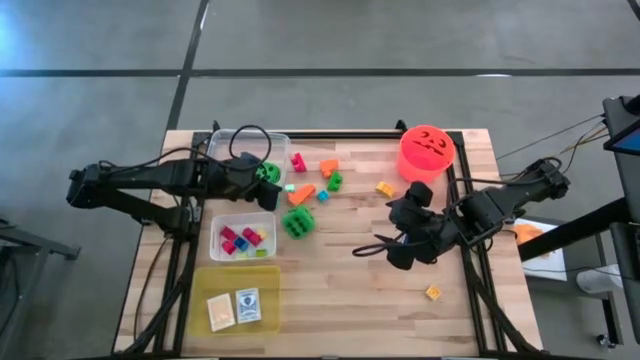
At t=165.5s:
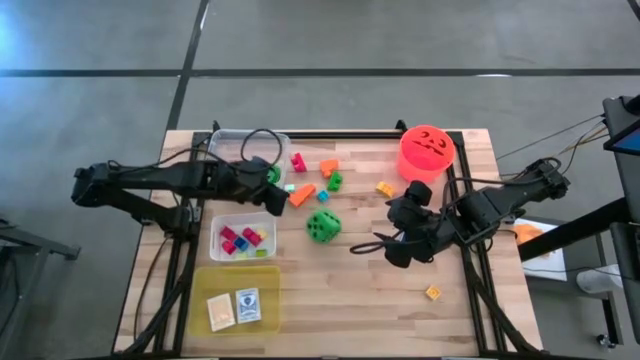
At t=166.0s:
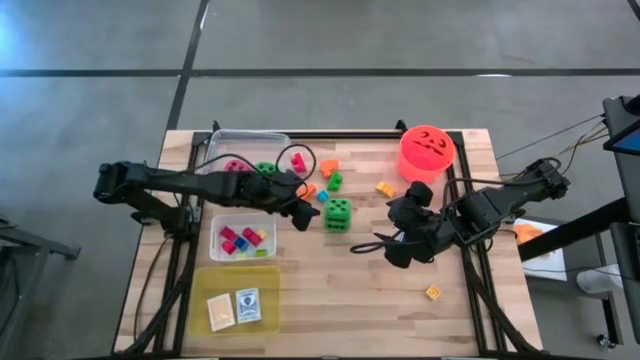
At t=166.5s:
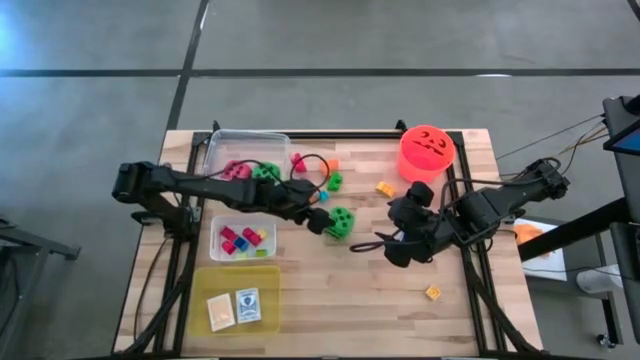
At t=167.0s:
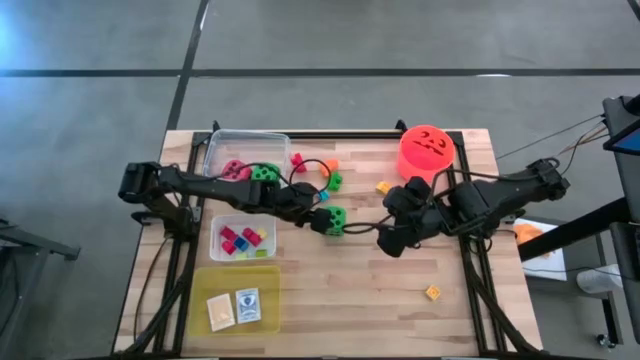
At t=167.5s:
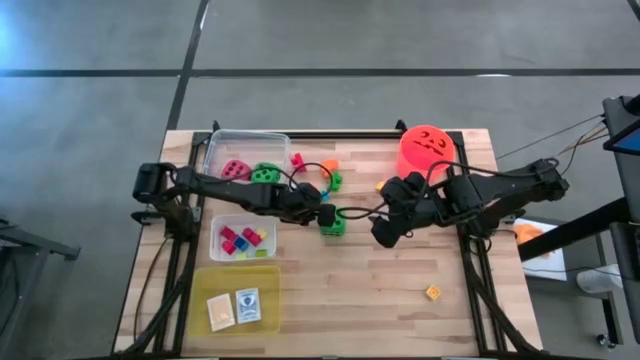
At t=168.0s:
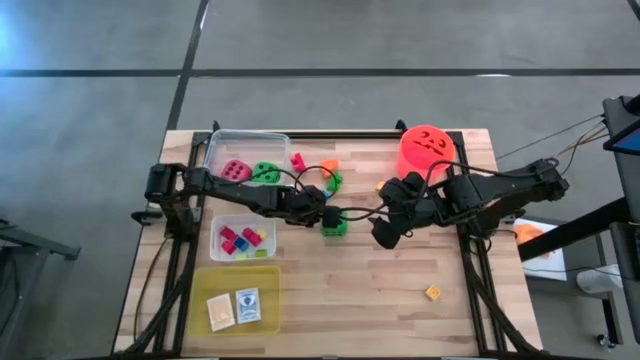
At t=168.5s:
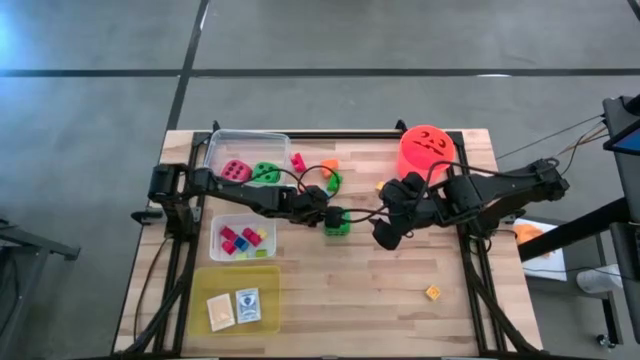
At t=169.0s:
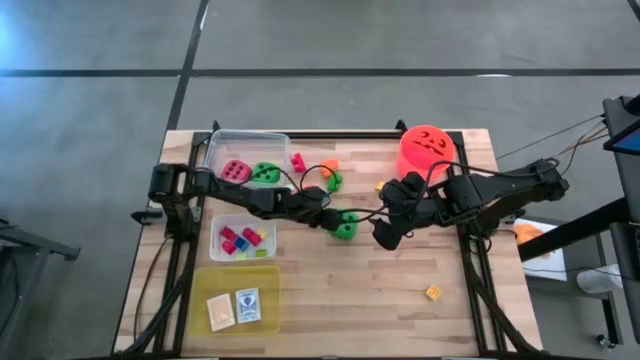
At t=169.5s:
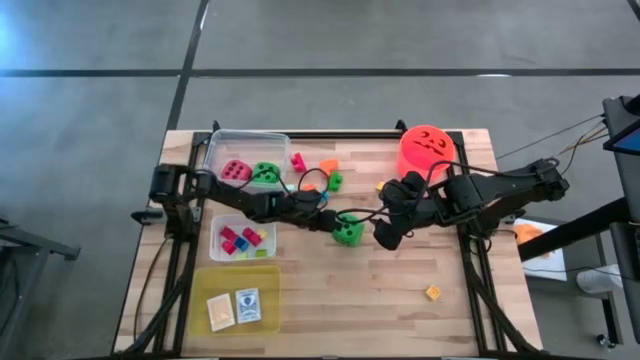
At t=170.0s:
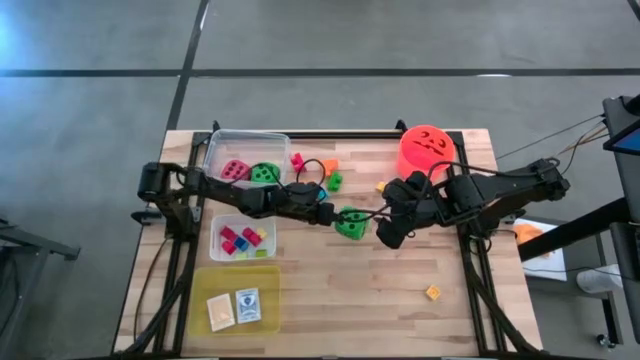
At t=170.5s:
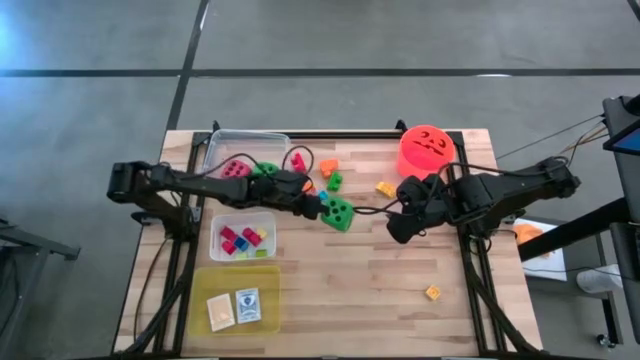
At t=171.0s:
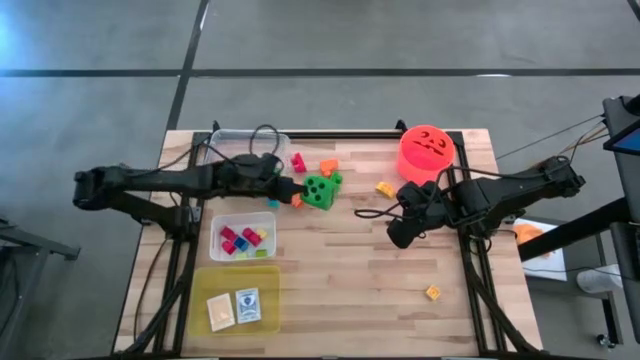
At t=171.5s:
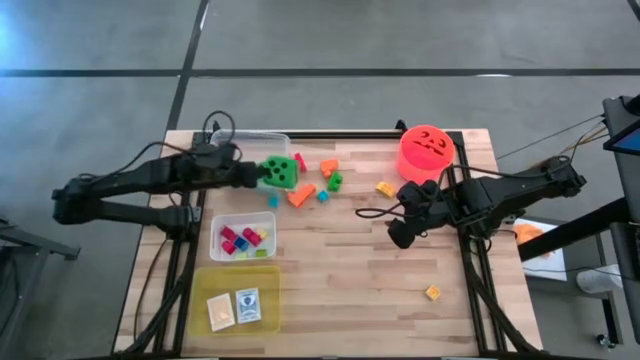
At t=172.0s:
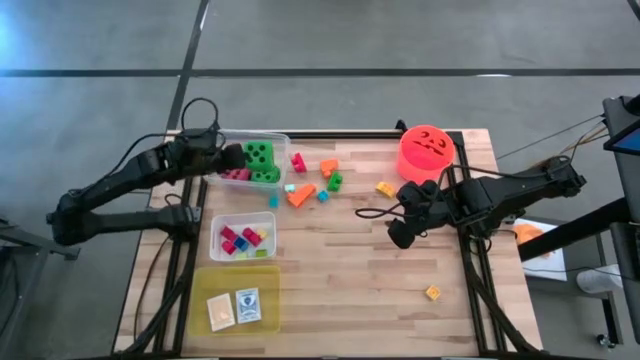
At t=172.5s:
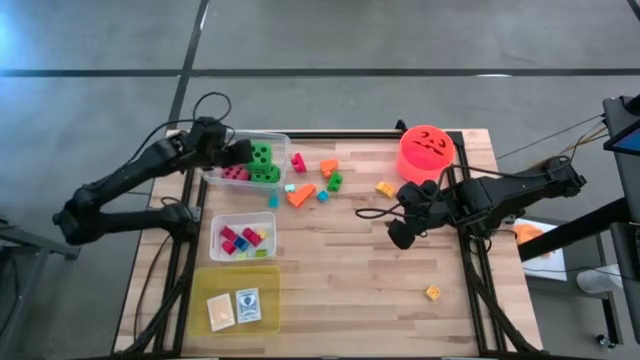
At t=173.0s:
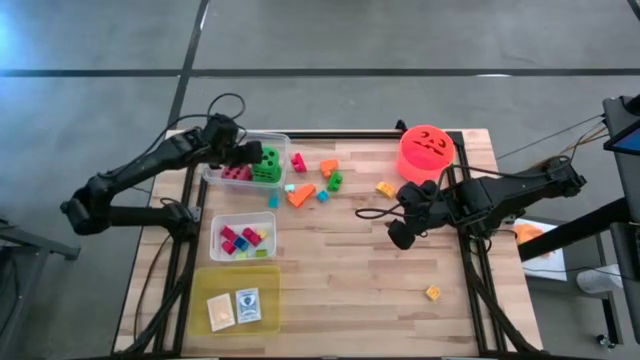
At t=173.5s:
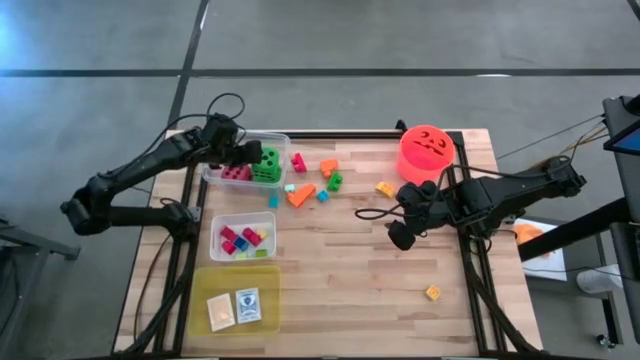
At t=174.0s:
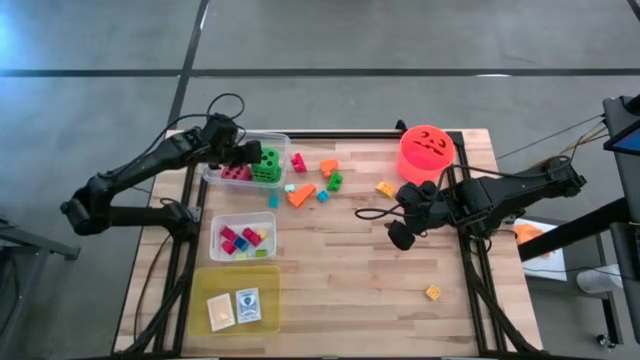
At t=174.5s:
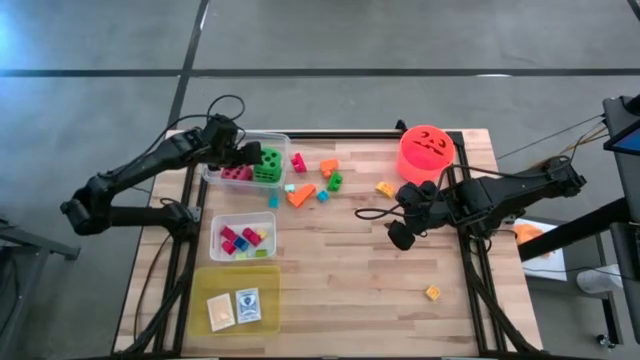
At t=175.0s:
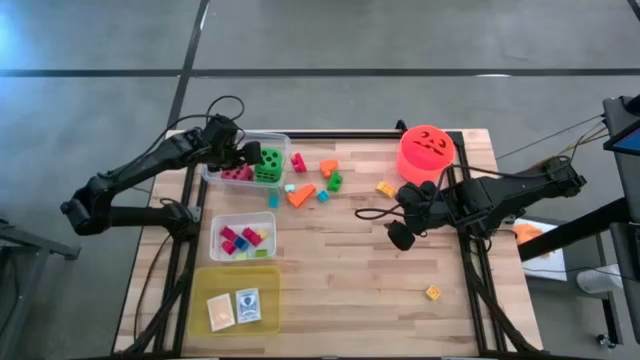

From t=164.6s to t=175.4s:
Task: Pick & Place Toys
Put the green dice into the transparent bin

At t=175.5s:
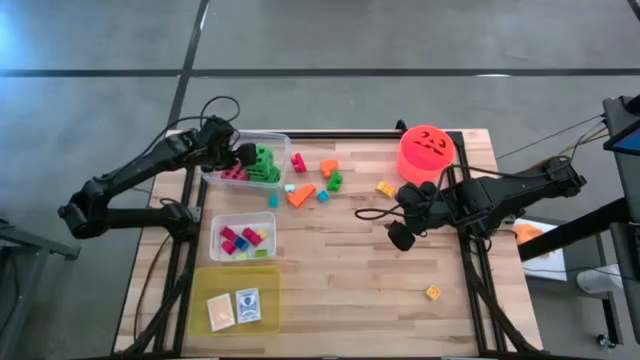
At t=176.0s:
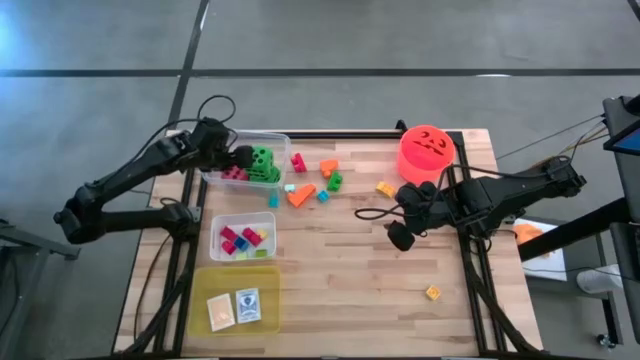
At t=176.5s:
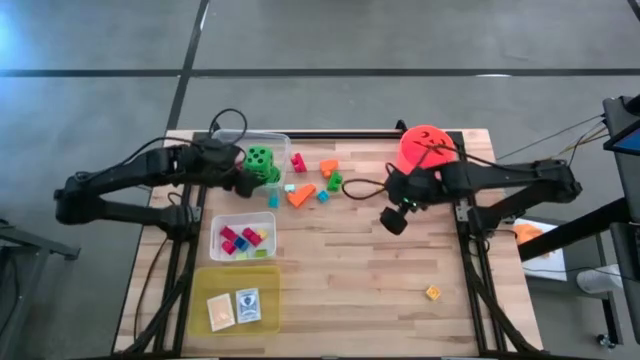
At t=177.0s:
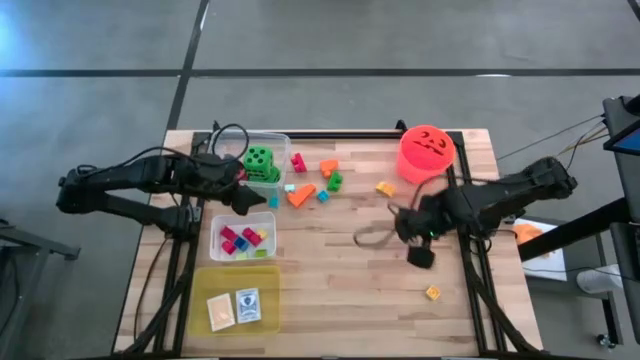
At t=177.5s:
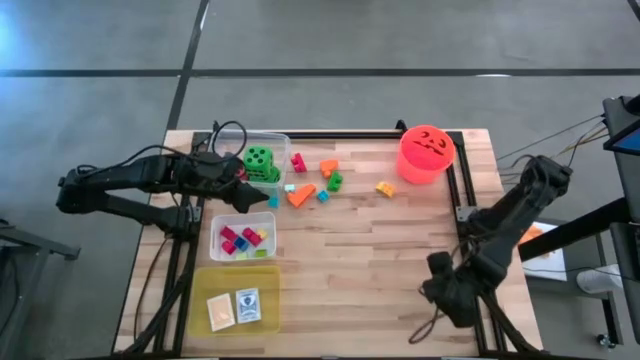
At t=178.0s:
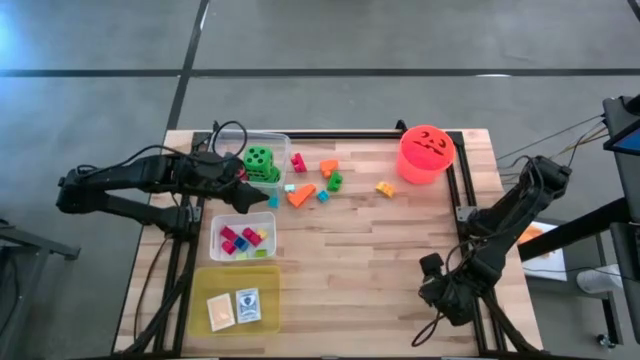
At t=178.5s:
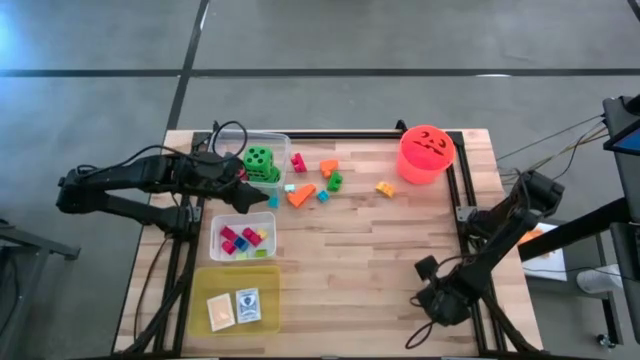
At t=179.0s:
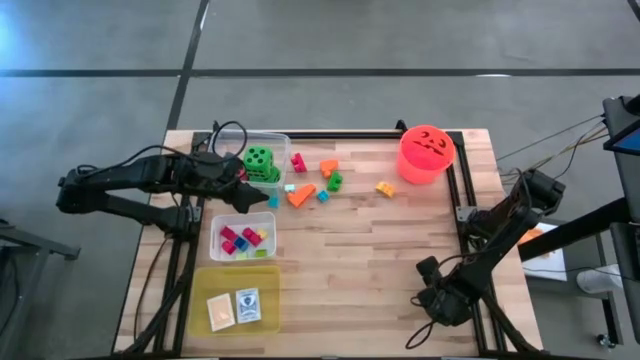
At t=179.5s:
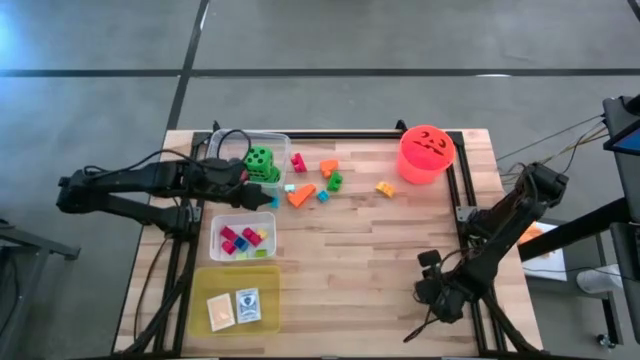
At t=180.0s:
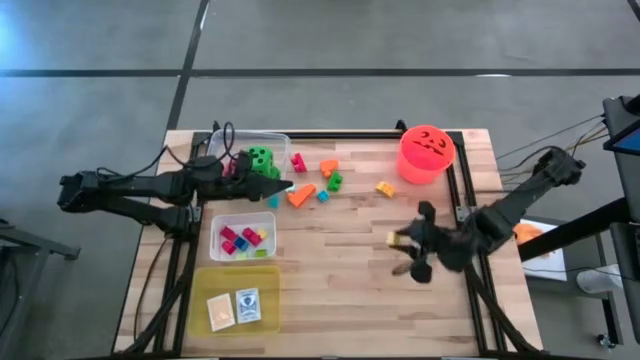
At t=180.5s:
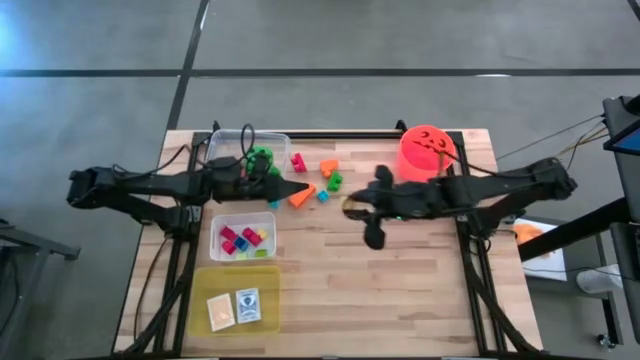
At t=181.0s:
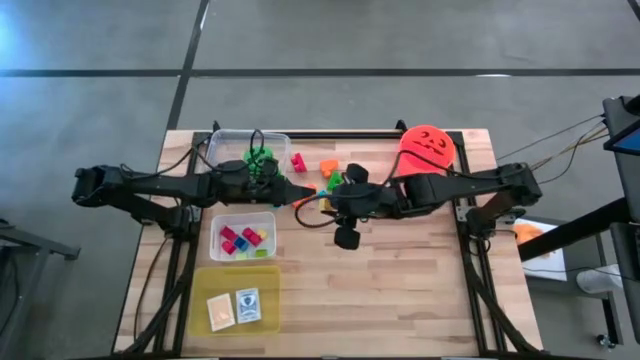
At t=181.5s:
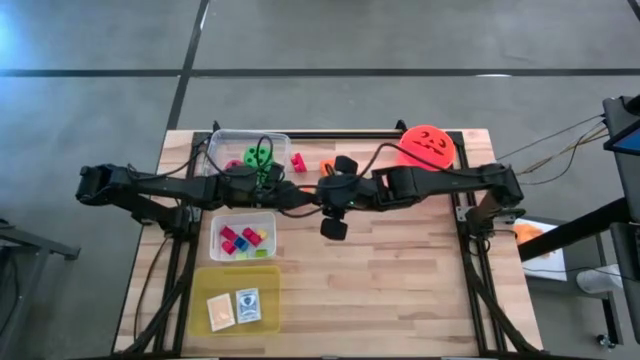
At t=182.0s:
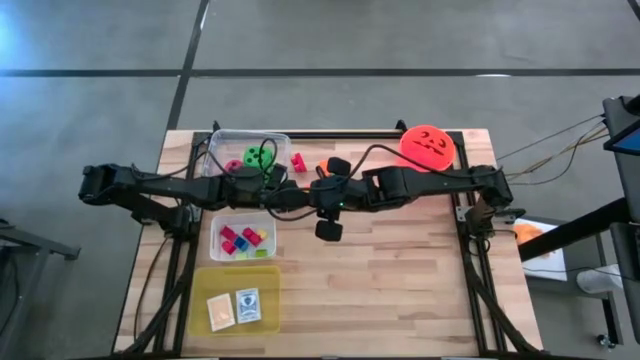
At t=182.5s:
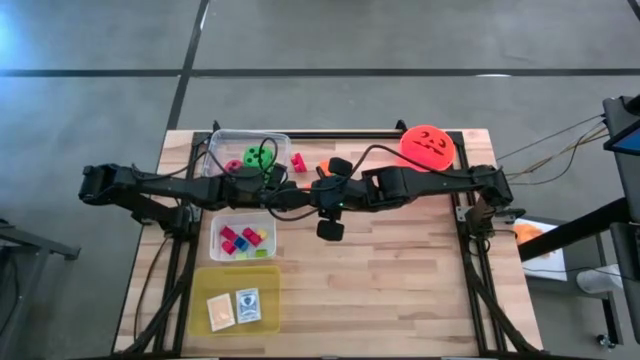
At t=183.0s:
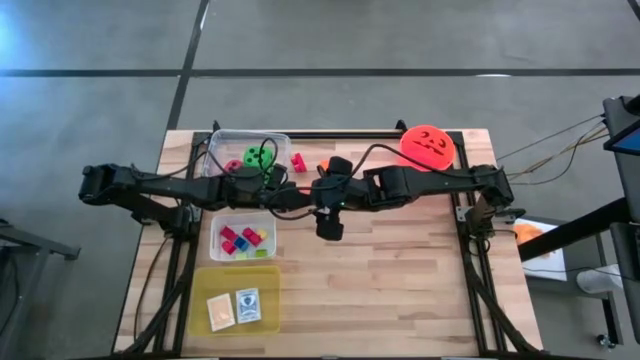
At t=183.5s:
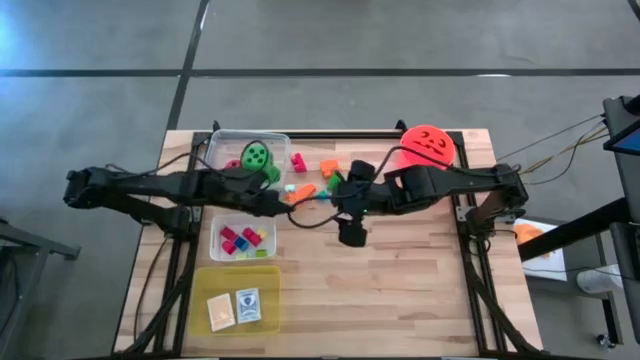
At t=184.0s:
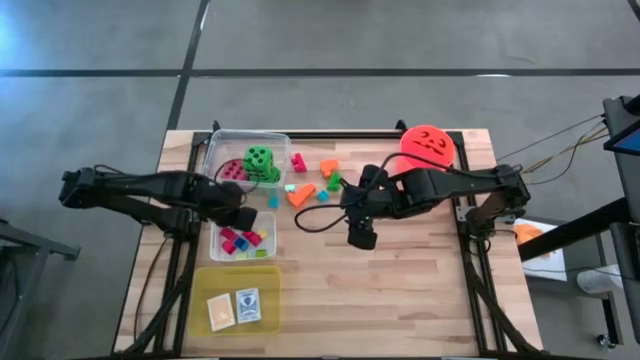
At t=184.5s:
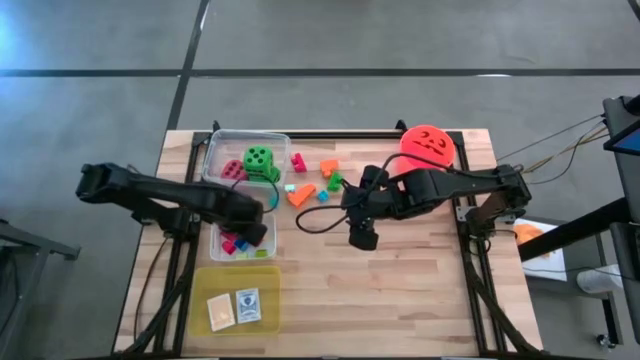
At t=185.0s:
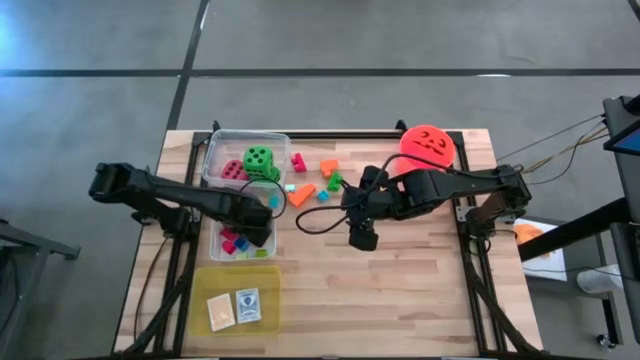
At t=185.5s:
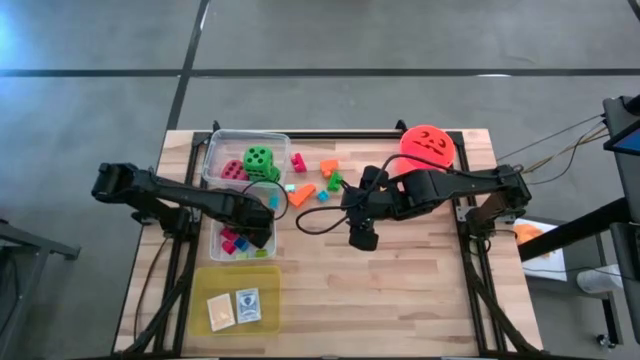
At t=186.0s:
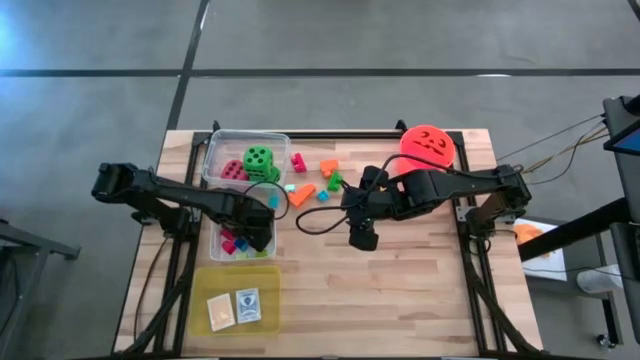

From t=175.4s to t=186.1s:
Put the yellow game piece into the white bin
